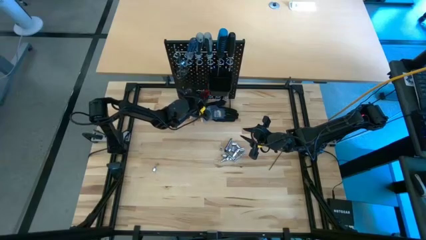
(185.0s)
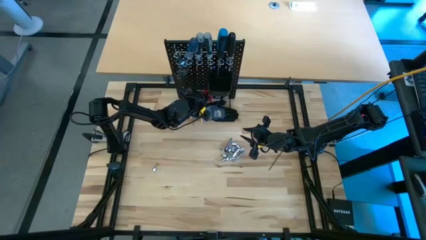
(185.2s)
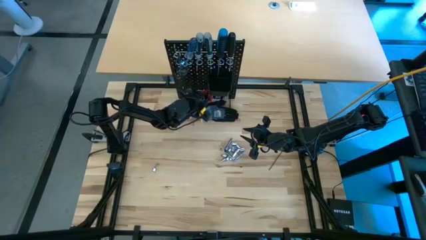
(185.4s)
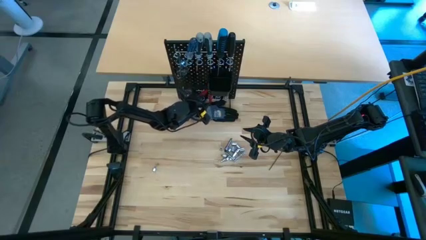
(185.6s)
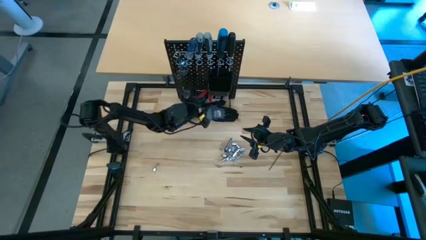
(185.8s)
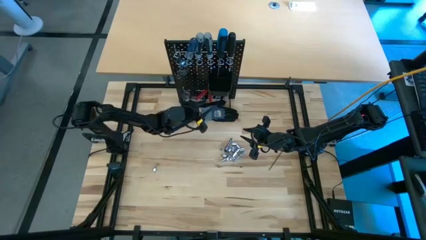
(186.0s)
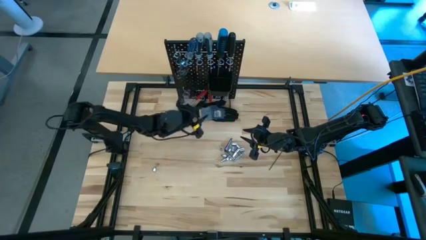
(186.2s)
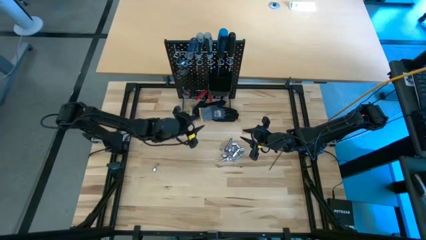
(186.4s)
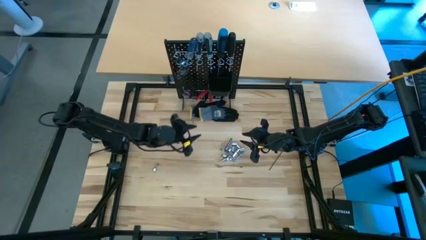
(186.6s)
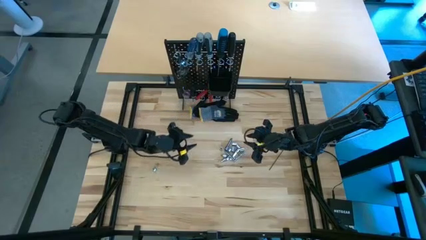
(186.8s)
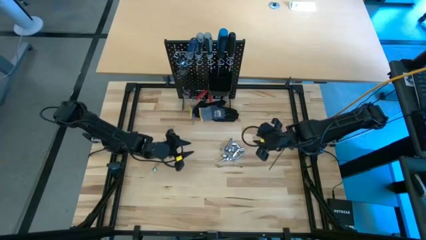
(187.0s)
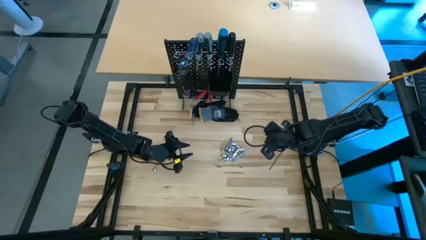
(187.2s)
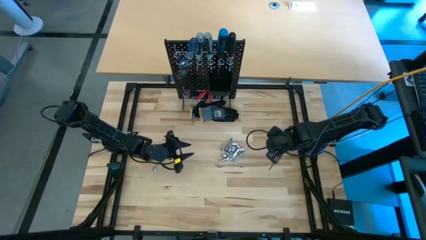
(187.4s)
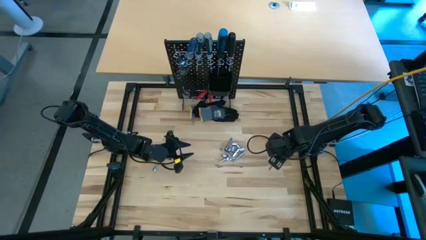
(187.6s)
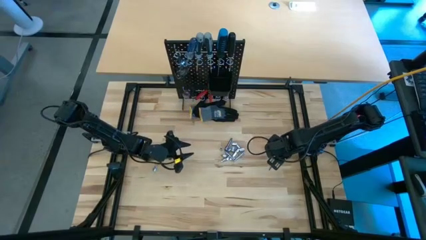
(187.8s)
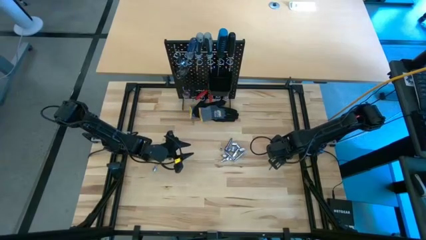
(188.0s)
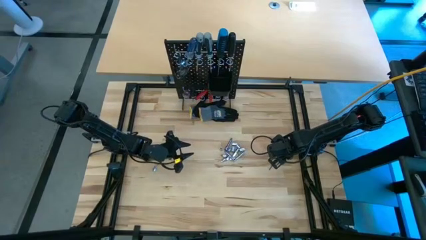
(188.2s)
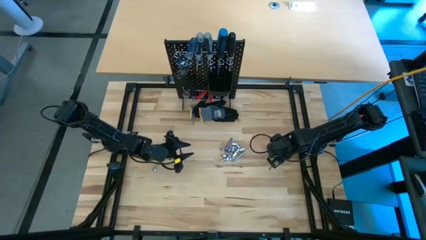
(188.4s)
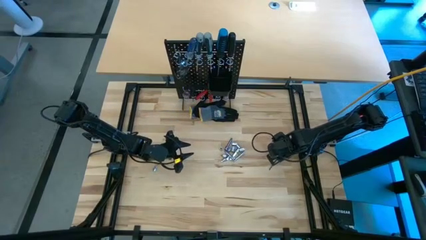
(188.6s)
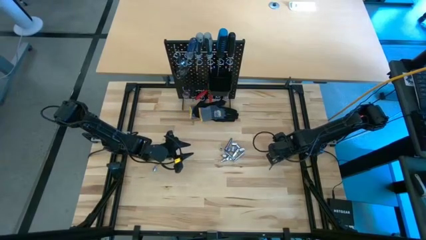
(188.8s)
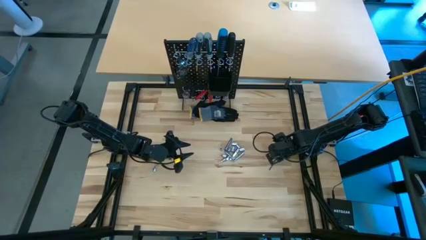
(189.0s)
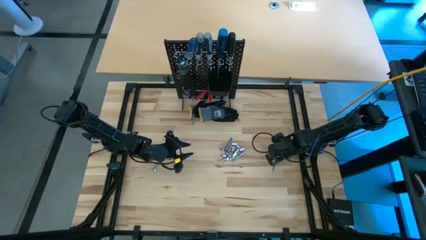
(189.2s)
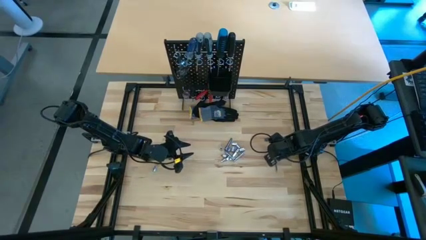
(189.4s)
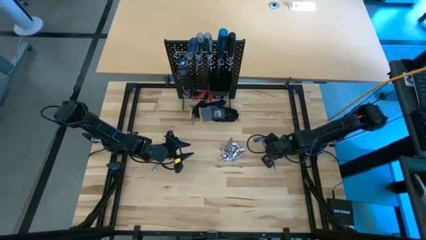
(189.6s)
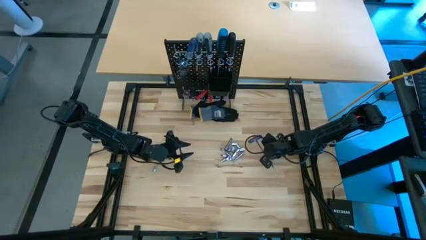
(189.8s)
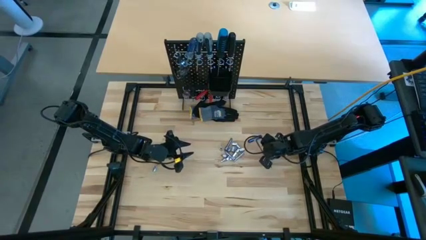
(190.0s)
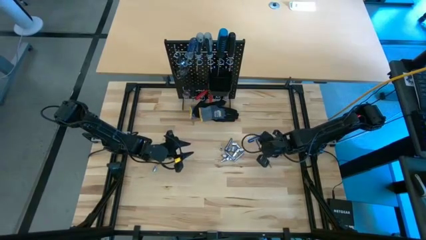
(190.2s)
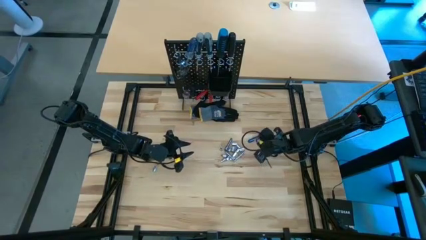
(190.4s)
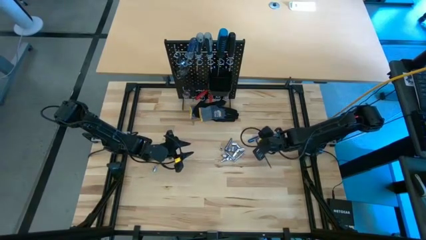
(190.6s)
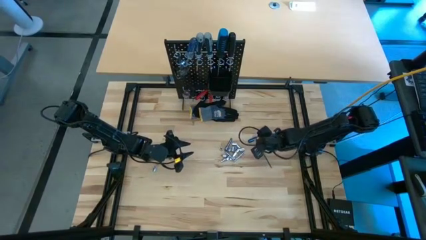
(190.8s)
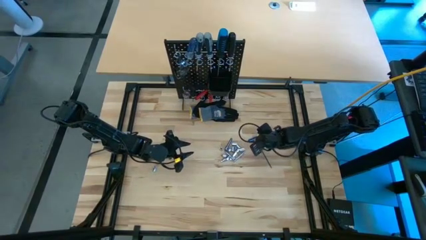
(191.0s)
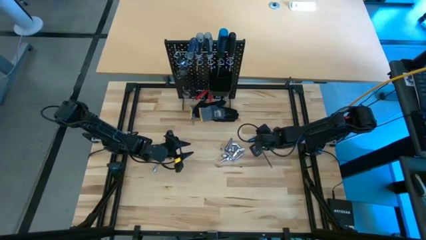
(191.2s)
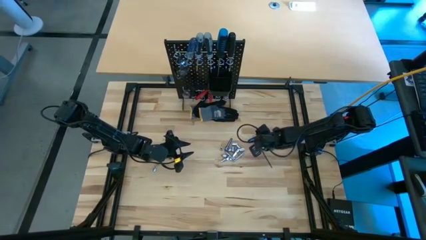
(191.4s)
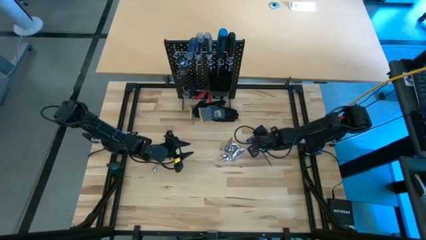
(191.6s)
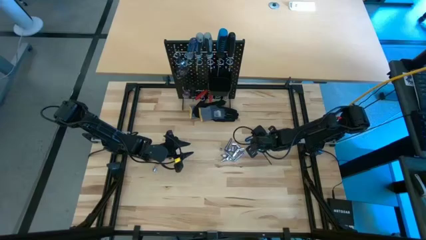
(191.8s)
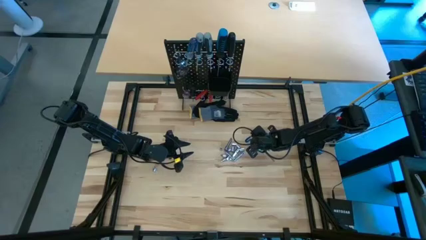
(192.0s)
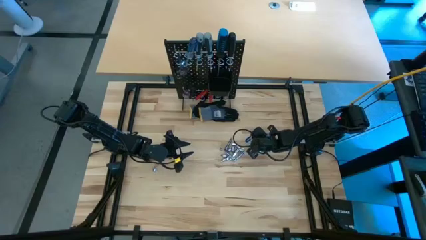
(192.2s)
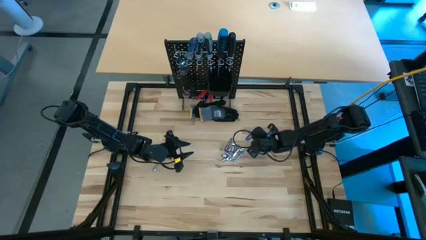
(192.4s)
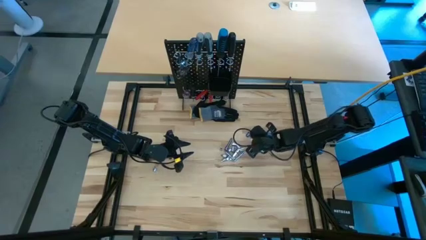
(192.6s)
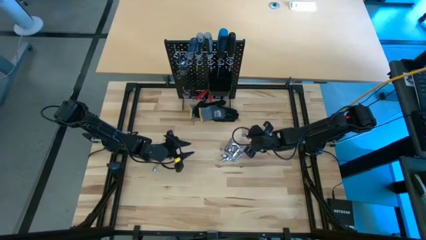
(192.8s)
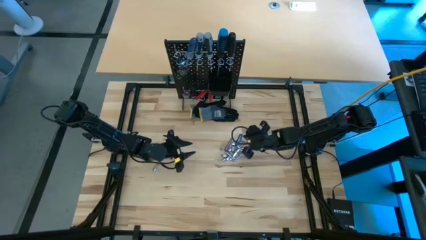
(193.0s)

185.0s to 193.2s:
Task: Hang tools onto peg board
Hang the blue pick tool on the pegboard

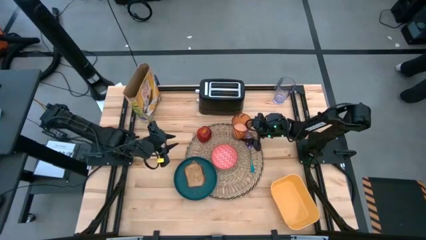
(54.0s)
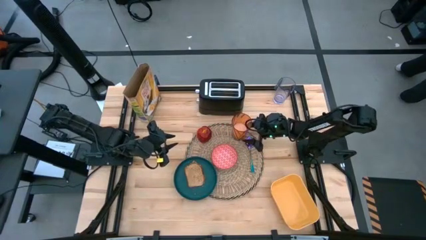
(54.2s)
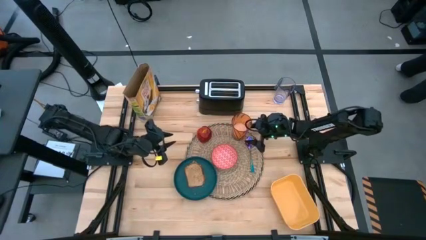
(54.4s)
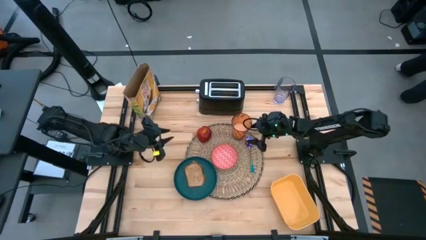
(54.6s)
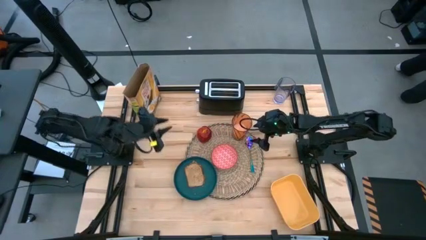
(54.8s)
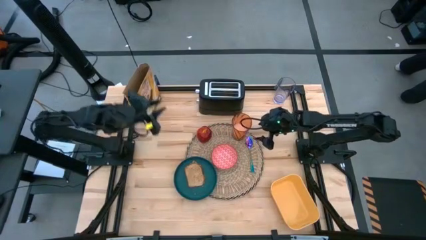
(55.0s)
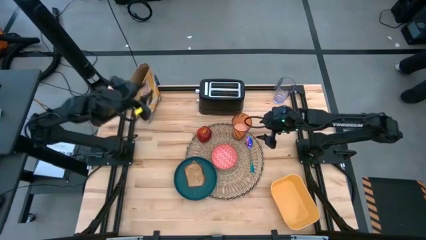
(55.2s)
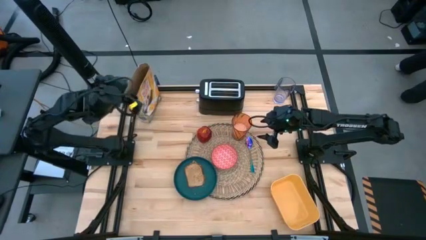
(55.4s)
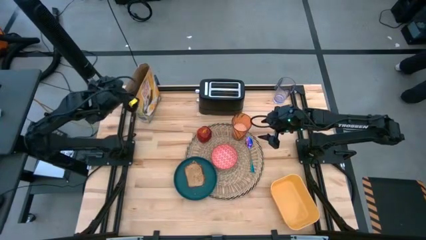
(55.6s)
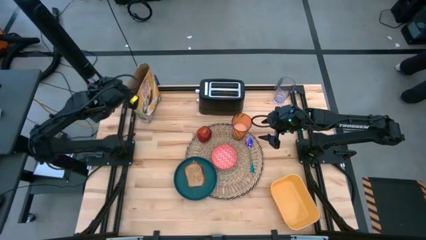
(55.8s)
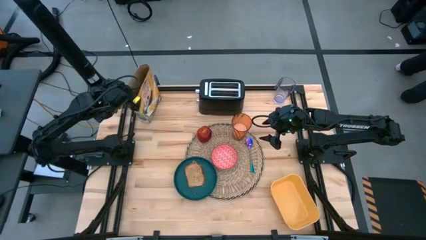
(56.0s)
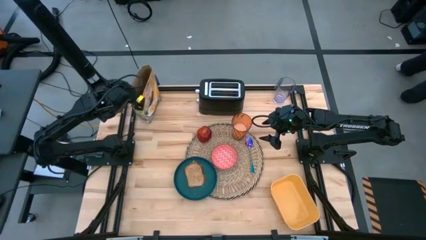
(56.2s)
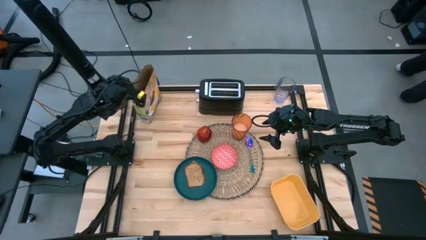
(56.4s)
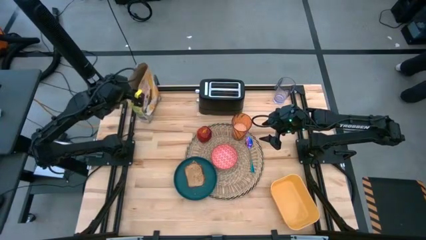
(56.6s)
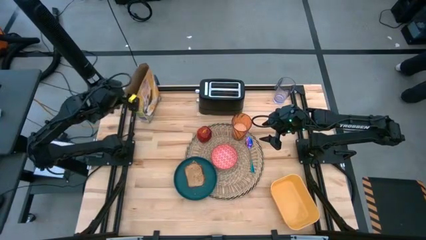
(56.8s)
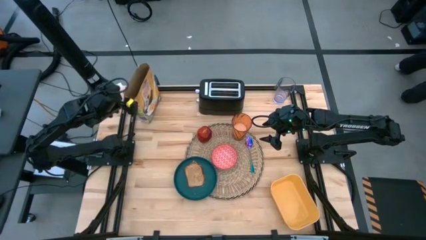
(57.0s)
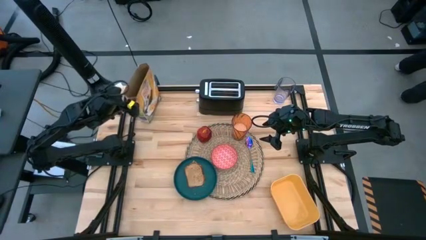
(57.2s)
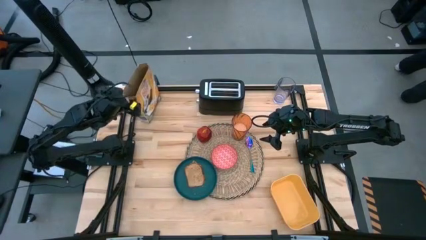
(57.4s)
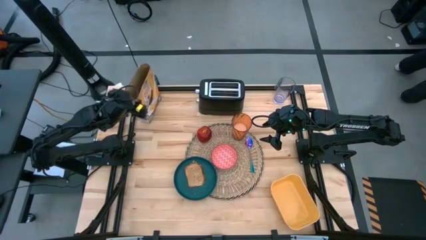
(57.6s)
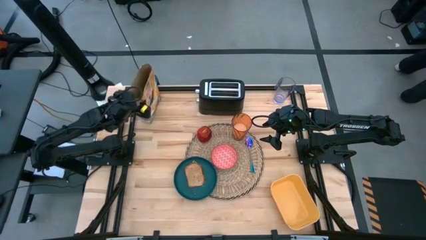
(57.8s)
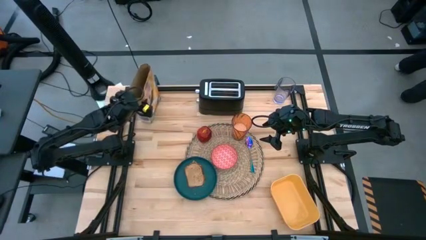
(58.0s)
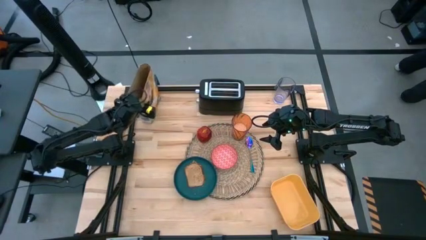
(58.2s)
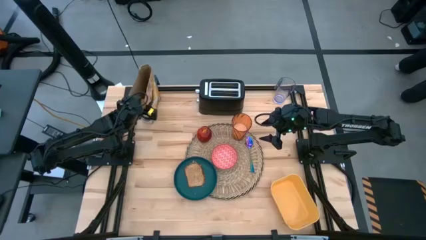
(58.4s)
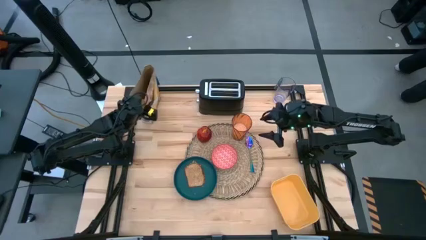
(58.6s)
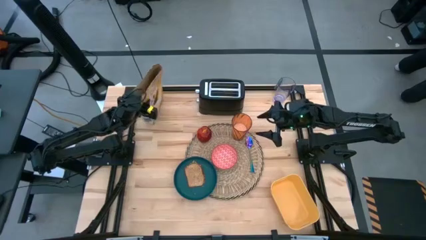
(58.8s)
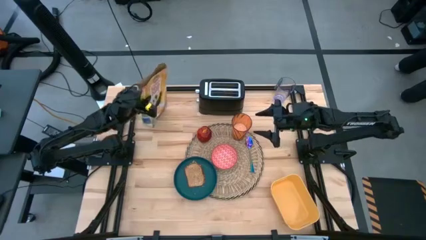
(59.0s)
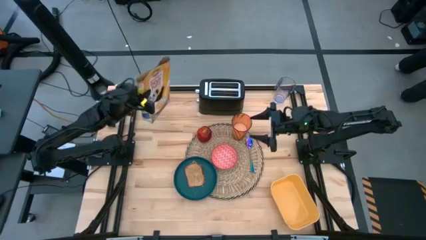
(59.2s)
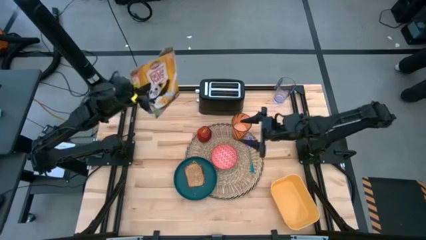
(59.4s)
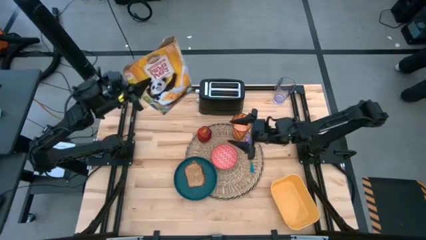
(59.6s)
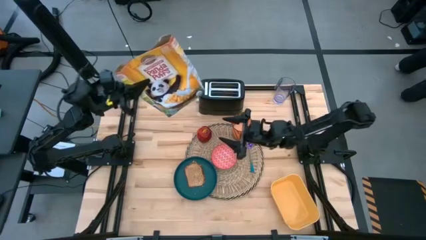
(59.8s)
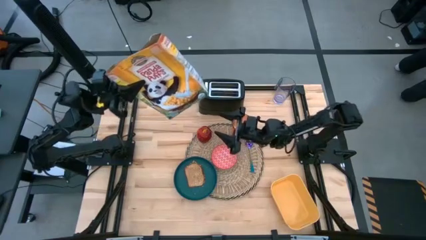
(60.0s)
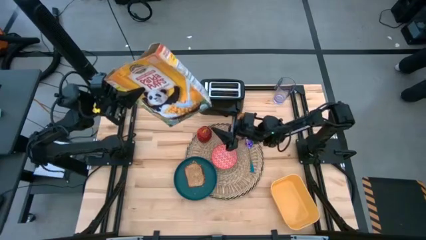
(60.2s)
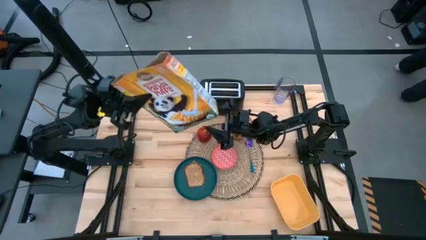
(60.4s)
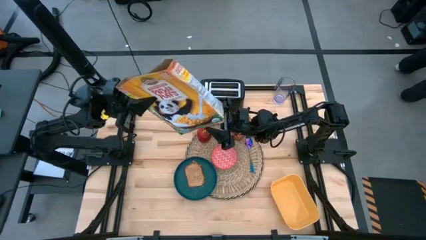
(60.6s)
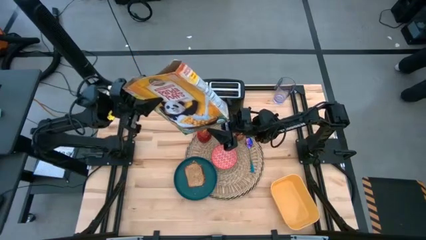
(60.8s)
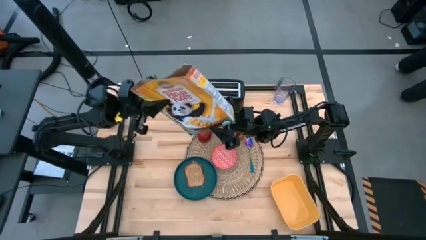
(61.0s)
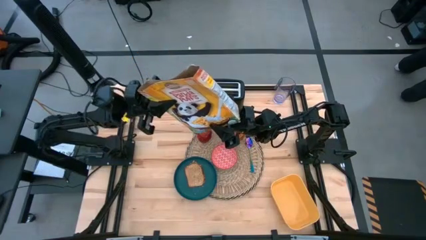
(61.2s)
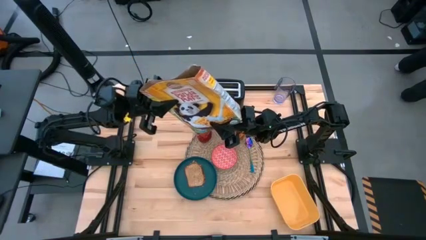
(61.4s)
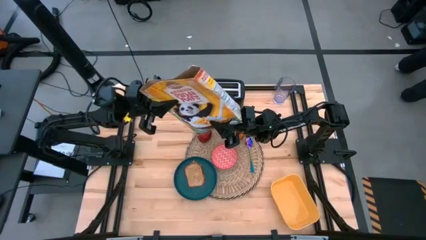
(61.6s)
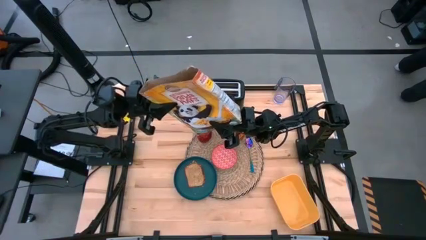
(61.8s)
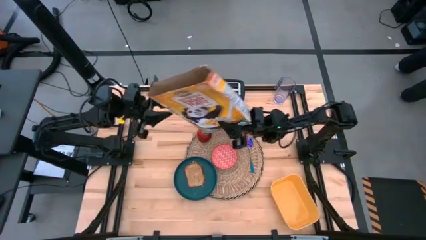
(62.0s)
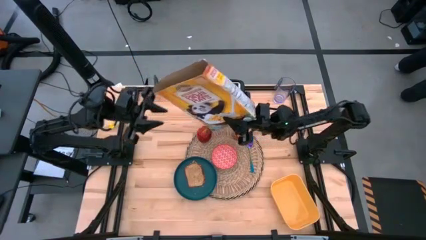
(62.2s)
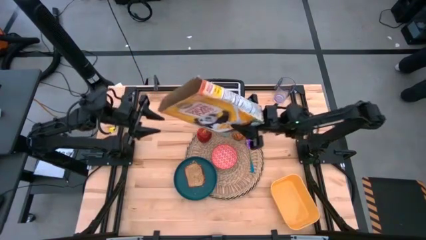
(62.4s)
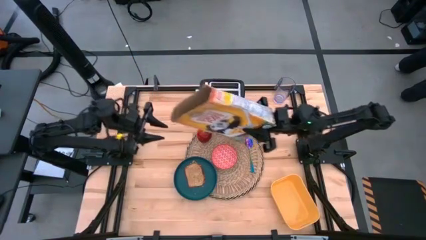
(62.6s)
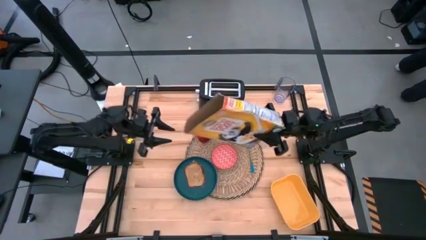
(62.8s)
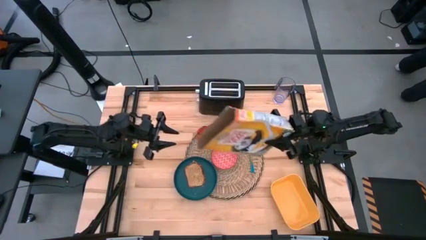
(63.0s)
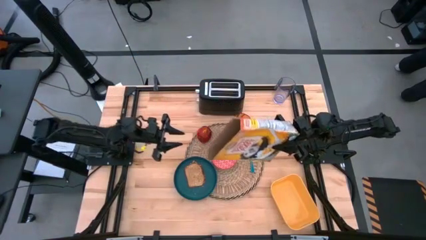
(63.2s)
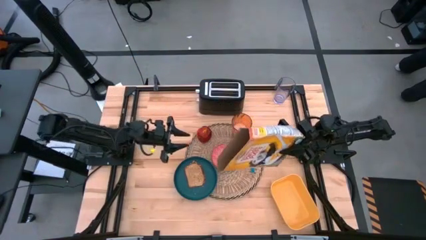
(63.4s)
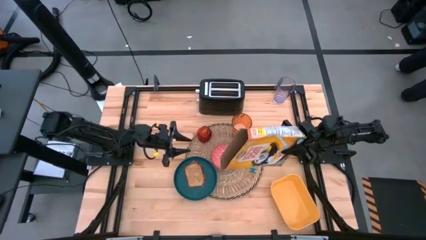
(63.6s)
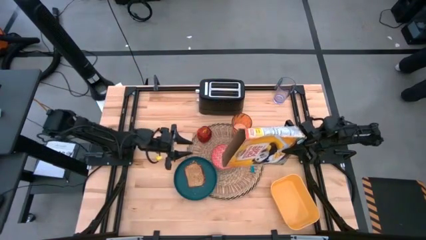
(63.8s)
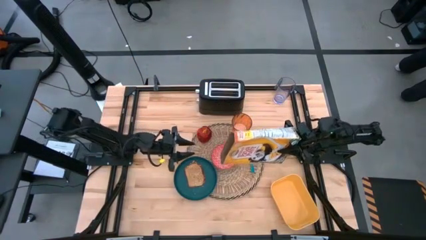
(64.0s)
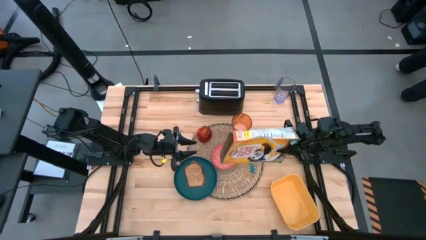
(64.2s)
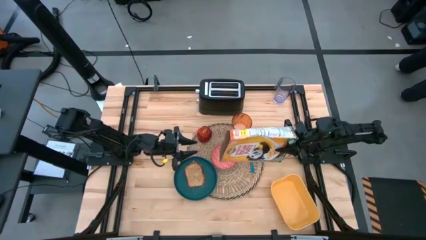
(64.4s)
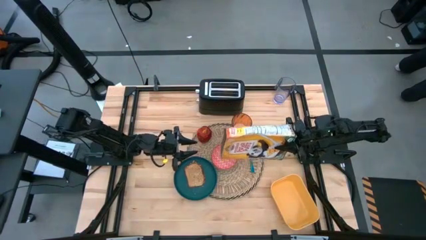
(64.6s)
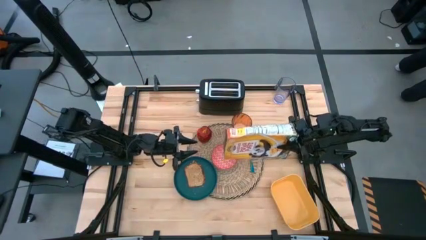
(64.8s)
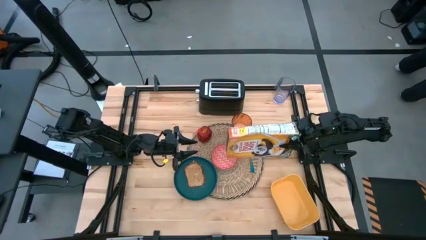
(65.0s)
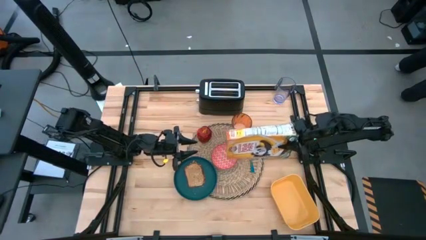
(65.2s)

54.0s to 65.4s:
Task: Arrange a breakfast setting
Pour the cereal from the yellow cereal box into the red bowl
